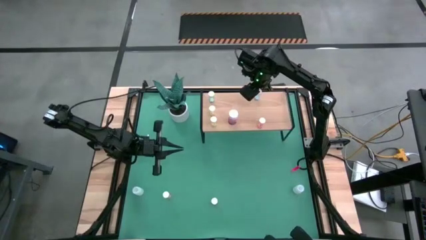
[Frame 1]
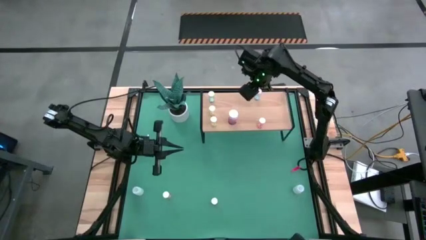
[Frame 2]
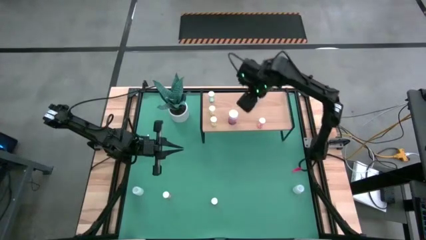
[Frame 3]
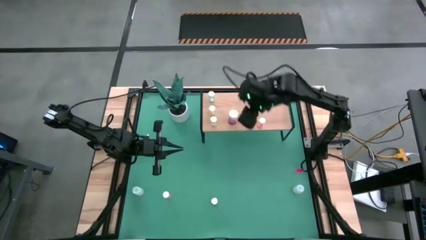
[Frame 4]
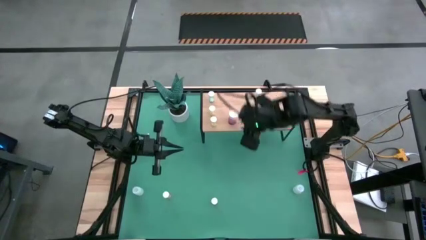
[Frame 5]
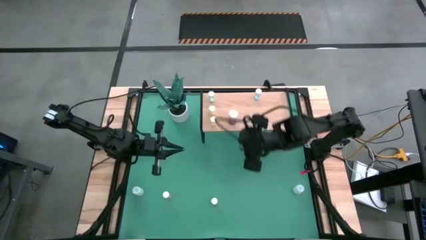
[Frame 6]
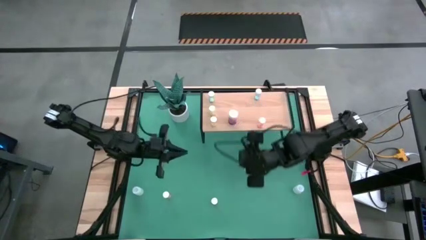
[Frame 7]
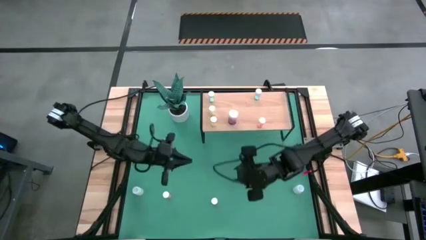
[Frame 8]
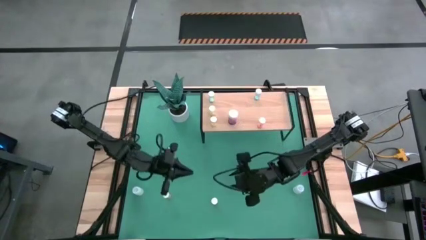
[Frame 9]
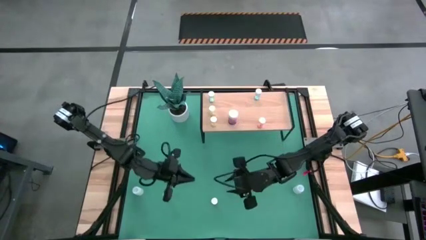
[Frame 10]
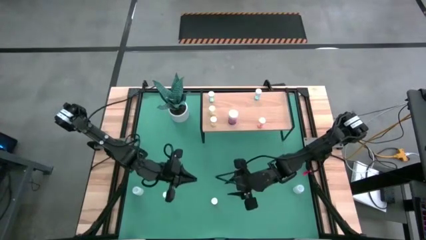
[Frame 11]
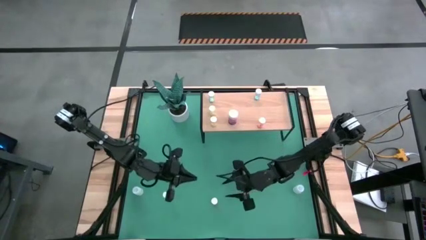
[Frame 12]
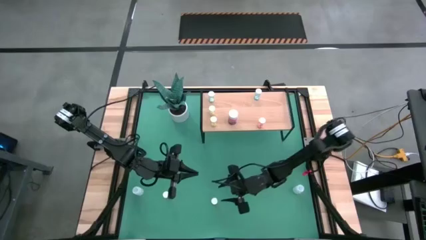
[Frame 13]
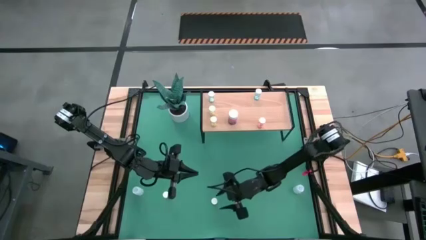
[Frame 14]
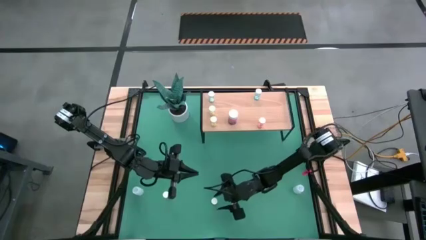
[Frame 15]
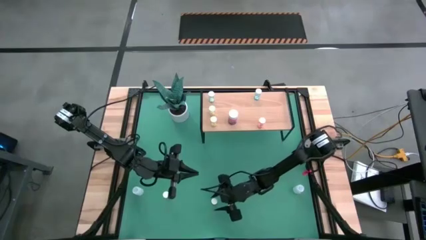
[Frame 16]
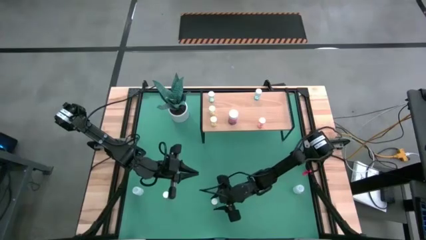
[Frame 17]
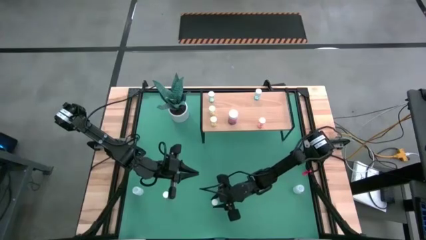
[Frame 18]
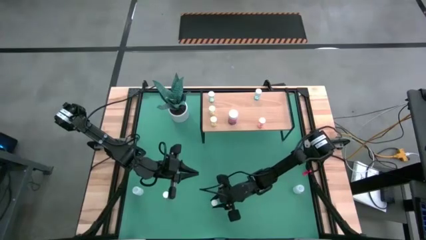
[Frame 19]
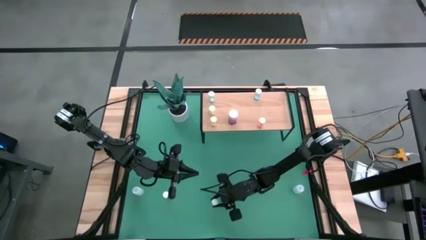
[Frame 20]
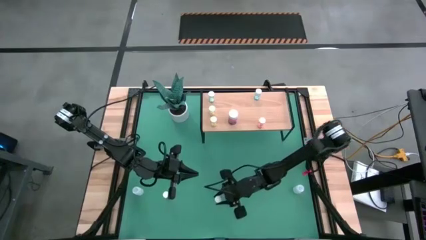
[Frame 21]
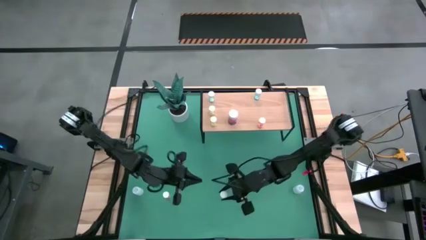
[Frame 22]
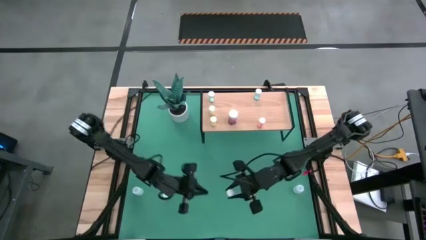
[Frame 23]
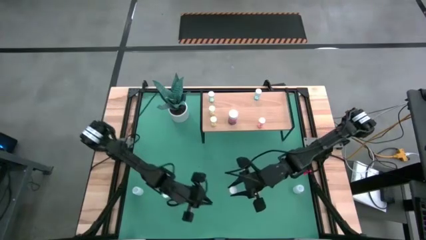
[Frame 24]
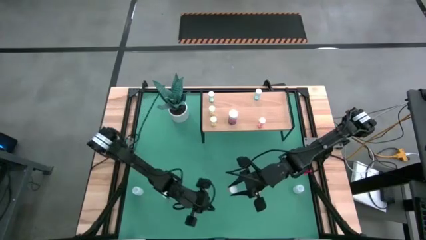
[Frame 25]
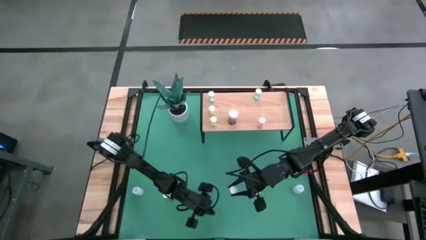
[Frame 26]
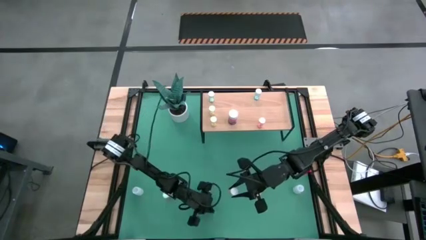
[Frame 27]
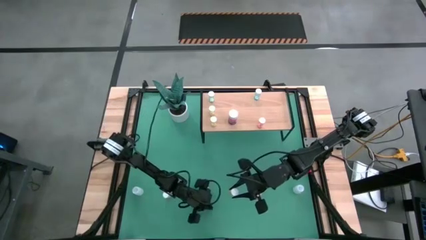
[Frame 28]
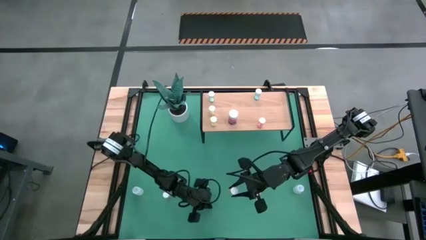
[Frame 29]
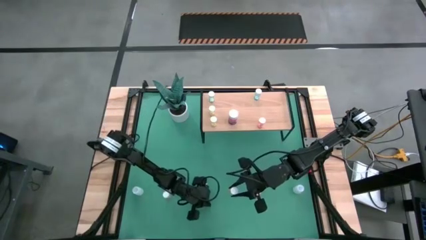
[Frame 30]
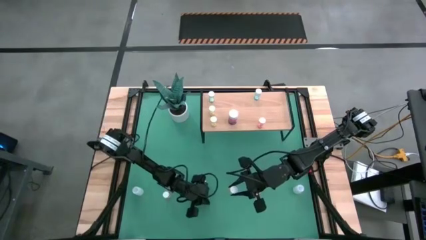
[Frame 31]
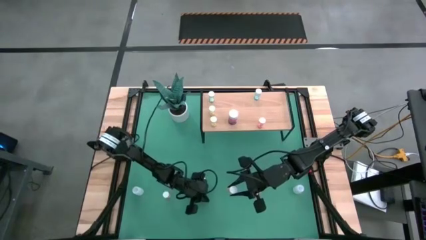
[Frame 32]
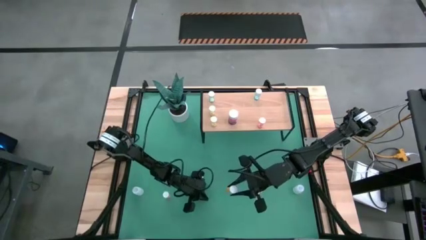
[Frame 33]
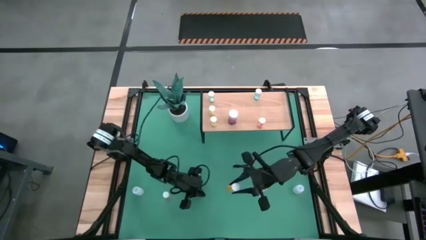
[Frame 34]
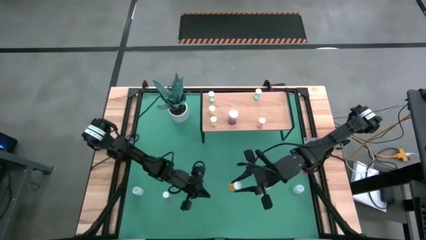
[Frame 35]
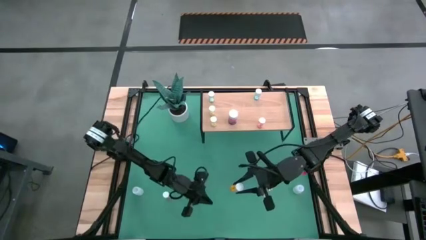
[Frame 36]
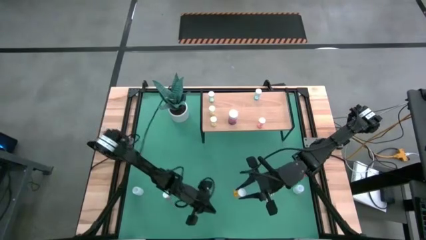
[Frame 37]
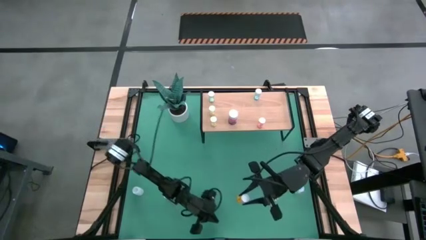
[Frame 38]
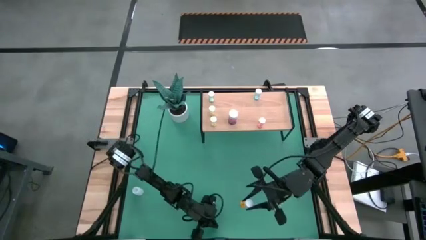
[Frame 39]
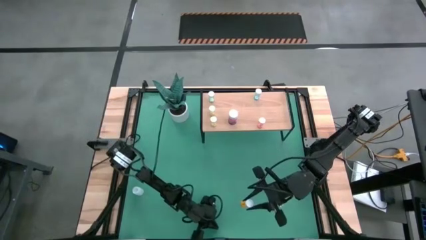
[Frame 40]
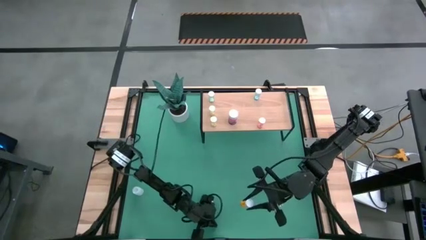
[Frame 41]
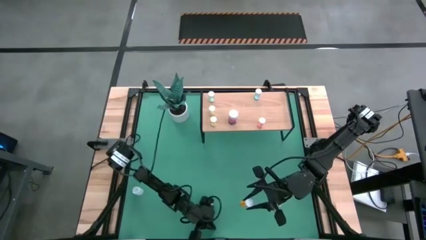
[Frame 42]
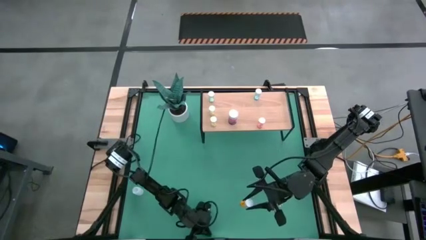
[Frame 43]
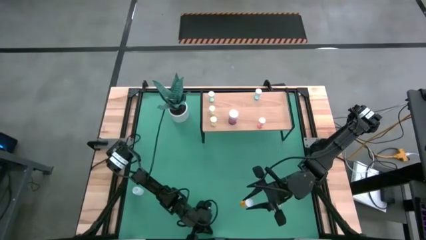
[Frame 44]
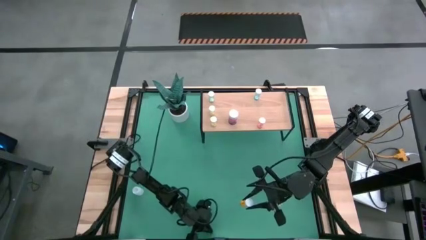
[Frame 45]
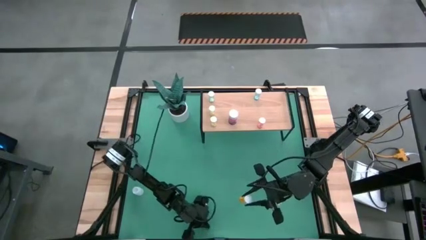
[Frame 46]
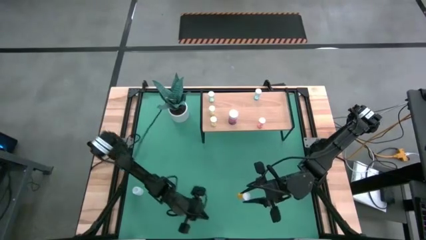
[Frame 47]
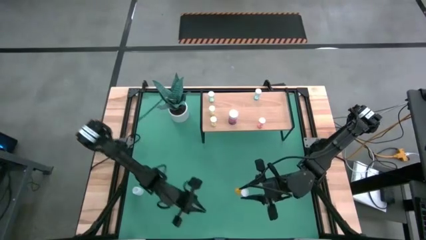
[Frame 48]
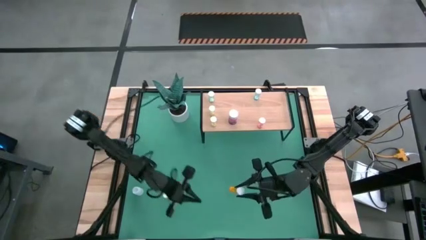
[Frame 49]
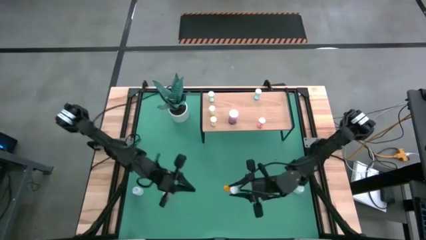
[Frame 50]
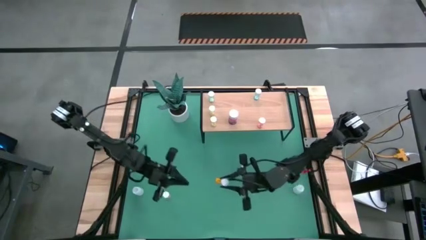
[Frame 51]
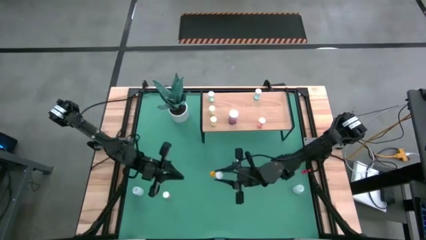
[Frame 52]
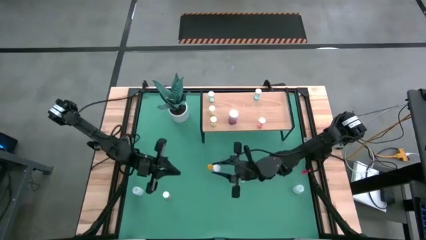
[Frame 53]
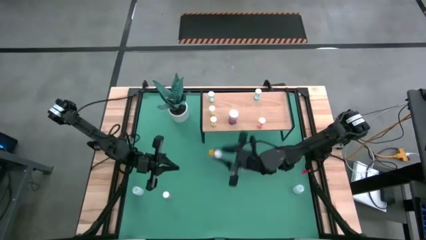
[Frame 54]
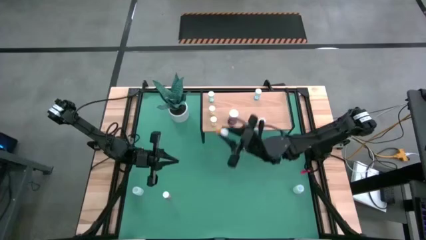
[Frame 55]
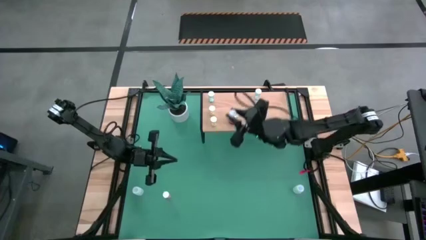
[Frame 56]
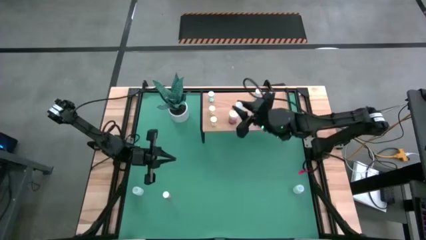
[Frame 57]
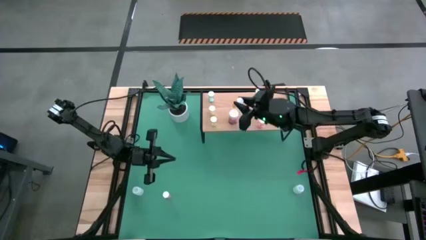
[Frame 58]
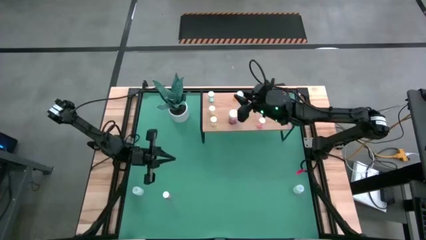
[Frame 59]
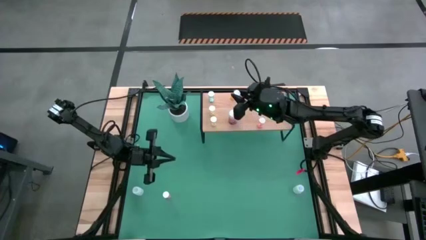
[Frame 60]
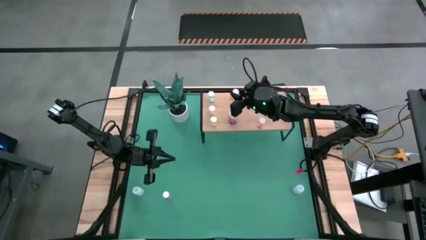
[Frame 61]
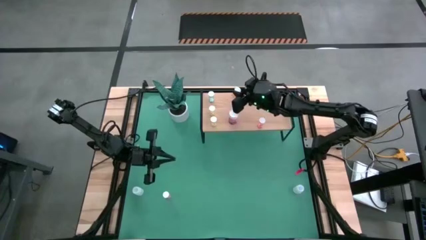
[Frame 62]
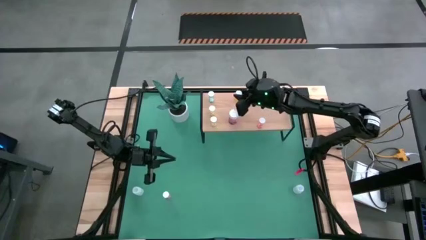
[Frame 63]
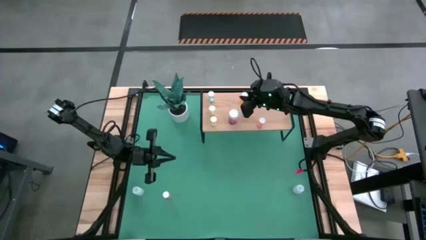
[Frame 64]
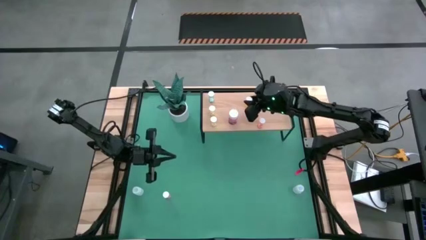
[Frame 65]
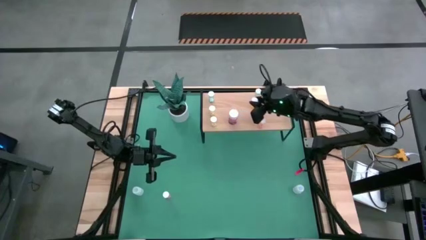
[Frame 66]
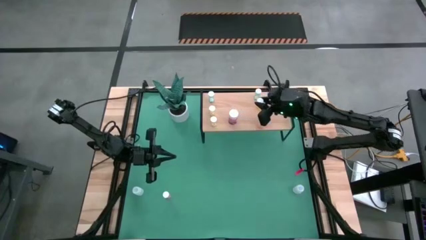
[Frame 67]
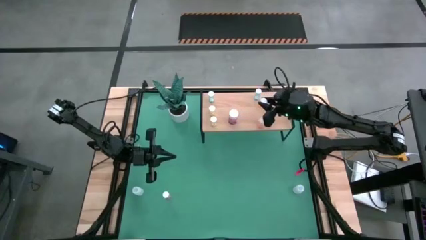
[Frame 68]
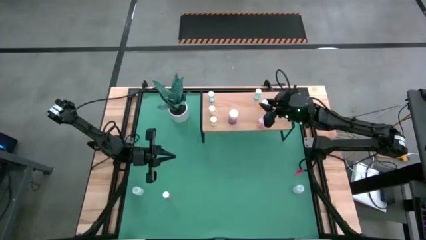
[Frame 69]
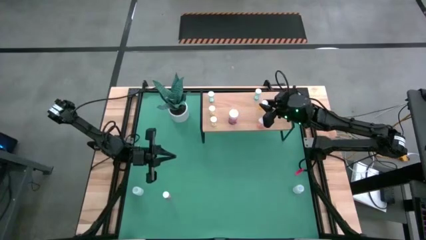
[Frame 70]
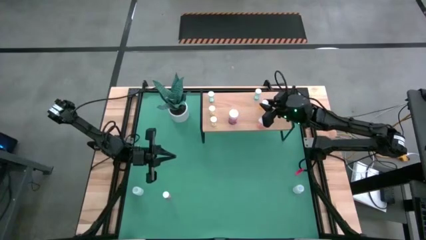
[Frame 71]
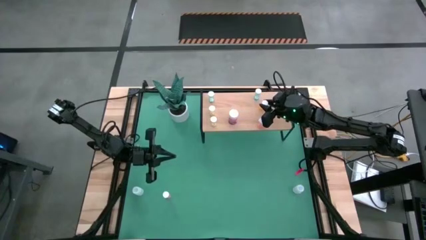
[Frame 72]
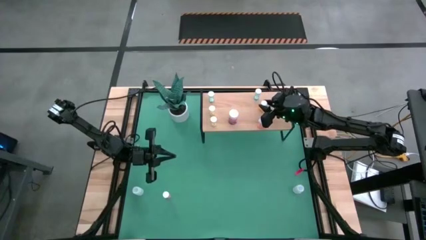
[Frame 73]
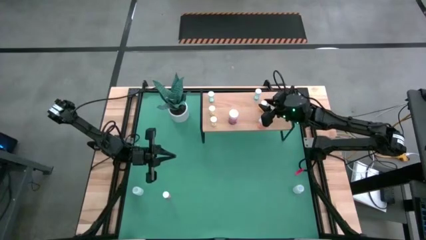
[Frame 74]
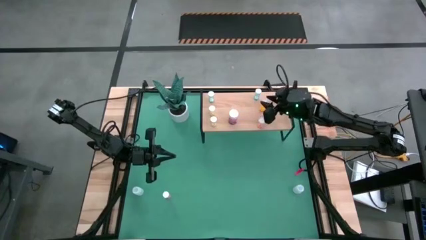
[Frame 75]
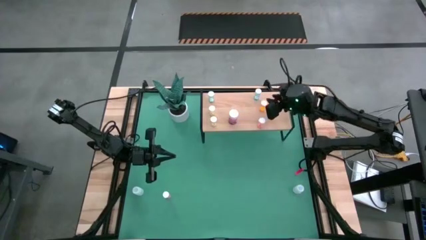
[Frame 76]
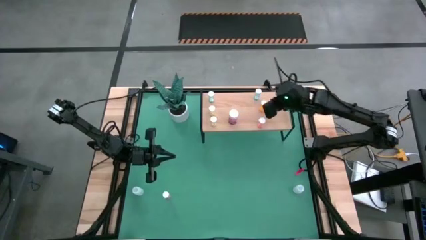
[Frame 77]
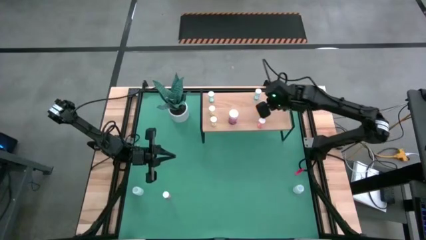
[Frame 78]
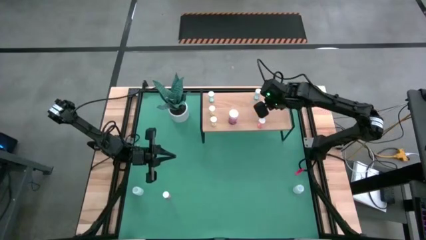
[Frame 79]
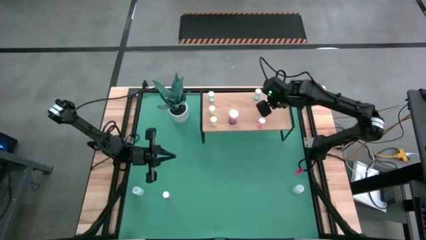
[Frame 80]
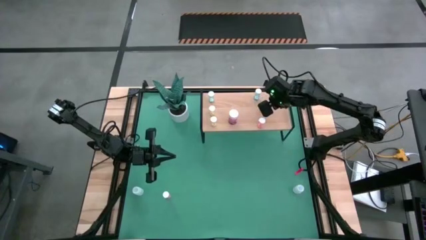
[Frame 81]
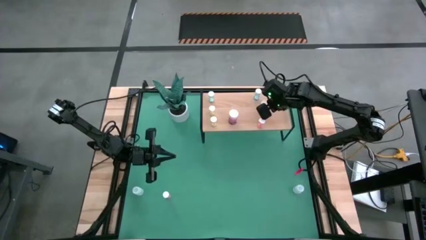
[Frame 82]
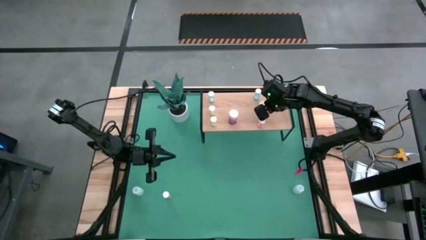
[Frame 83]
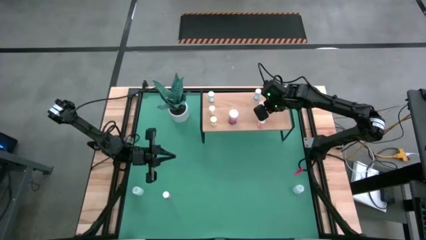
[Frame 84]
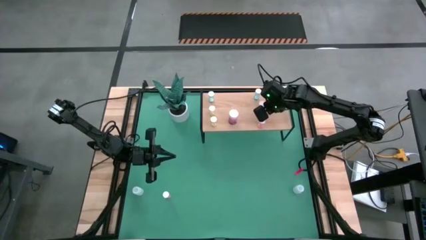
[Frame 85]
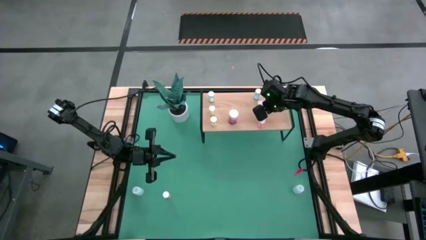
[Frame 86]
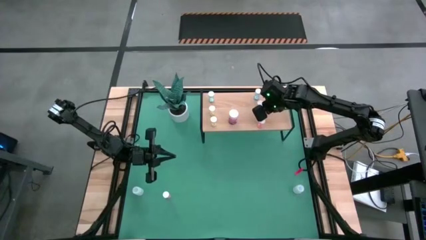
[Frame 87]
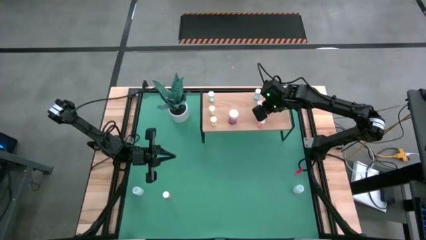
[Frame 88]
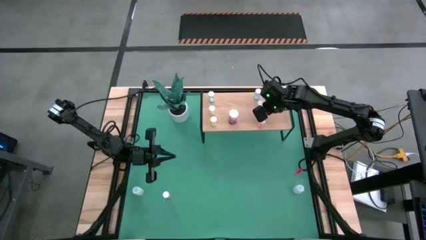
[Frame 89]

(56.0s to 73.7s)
Task: Pick and place medicine bottles onto shelf by color
Put the orange pill bottle on the shelf
